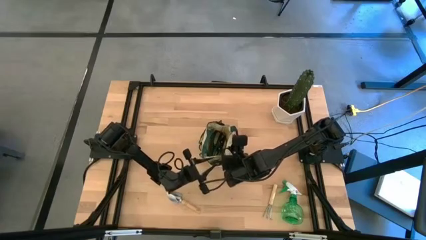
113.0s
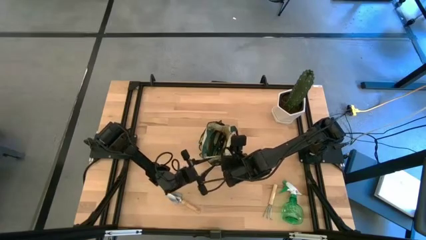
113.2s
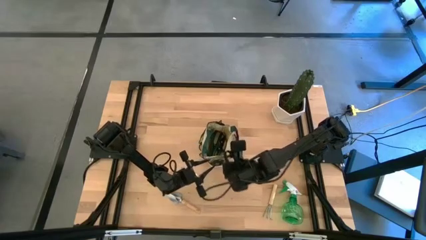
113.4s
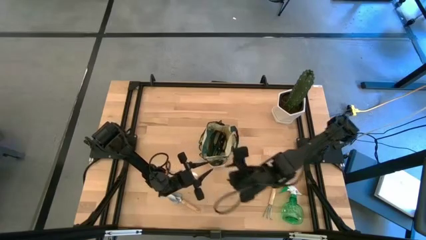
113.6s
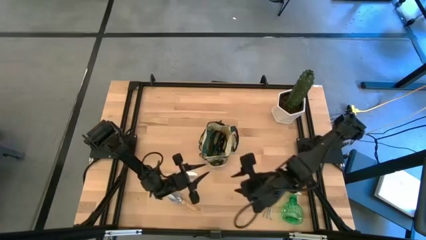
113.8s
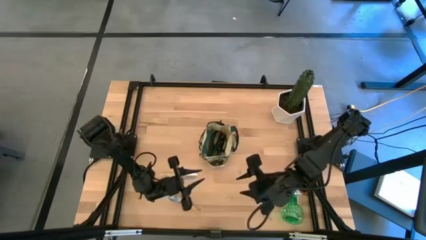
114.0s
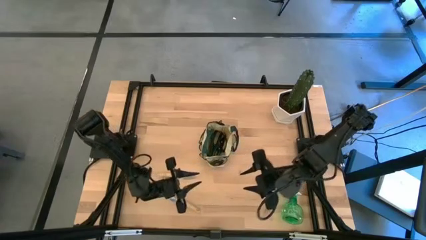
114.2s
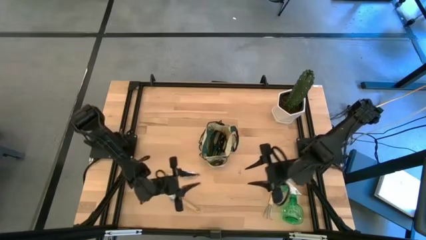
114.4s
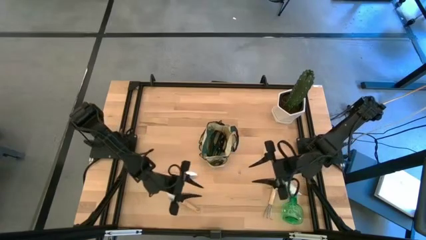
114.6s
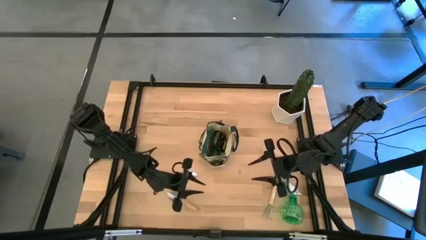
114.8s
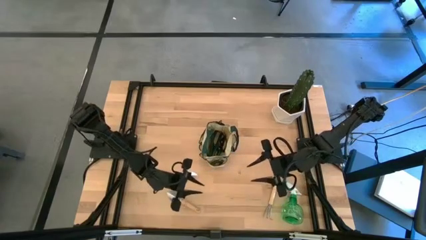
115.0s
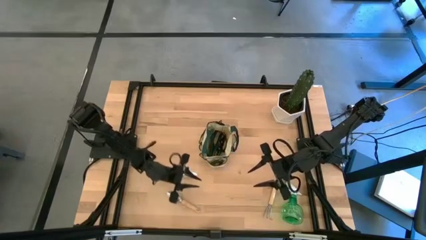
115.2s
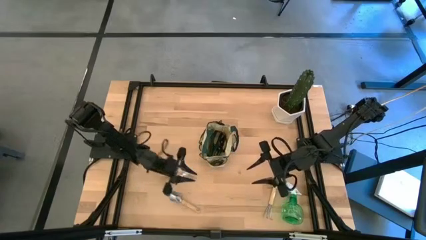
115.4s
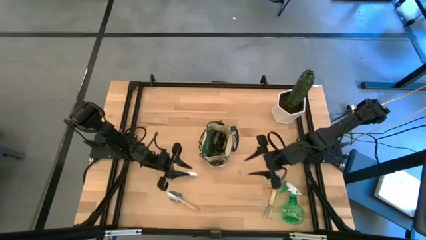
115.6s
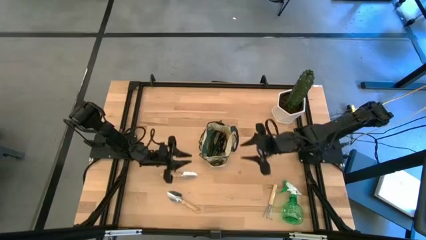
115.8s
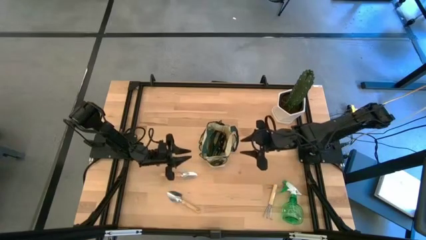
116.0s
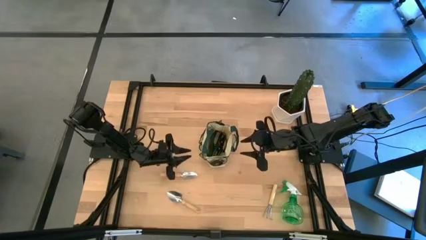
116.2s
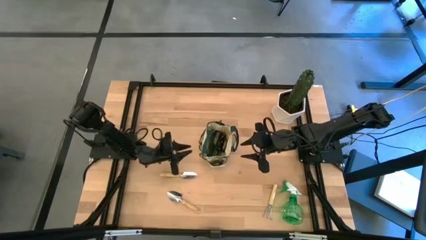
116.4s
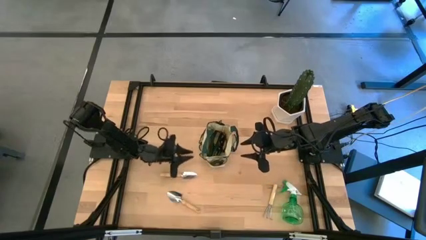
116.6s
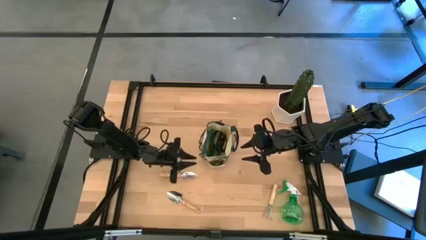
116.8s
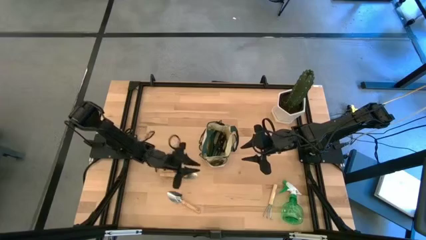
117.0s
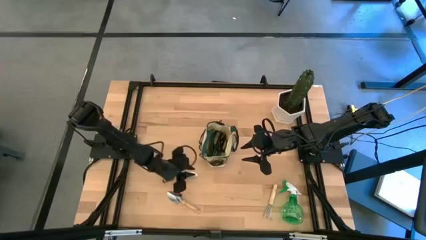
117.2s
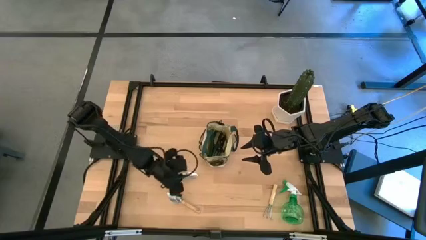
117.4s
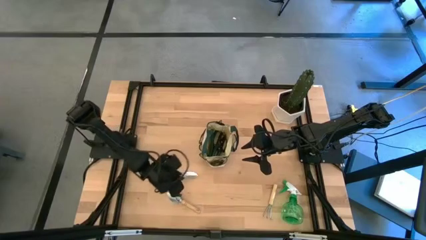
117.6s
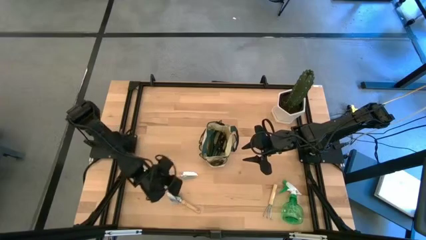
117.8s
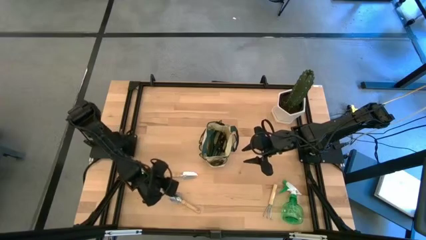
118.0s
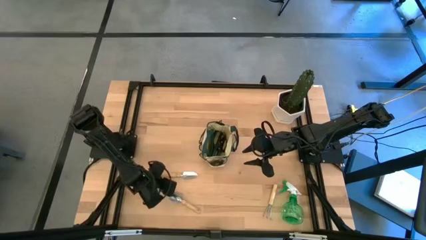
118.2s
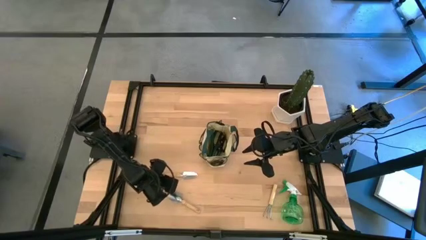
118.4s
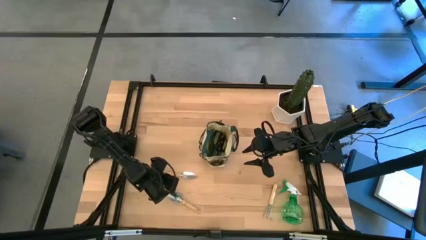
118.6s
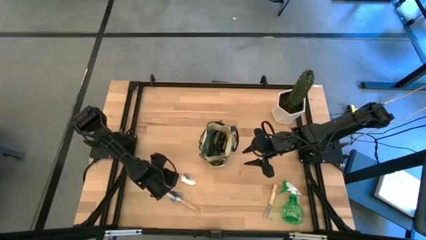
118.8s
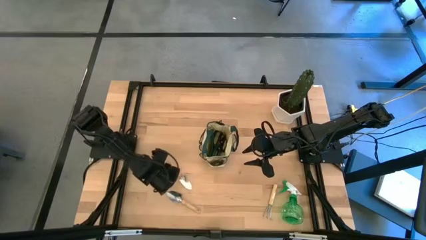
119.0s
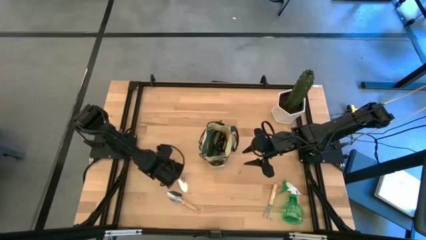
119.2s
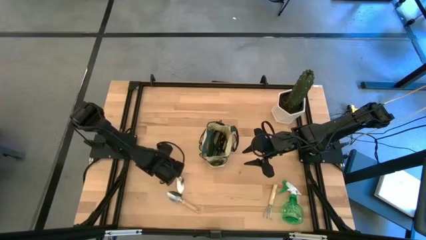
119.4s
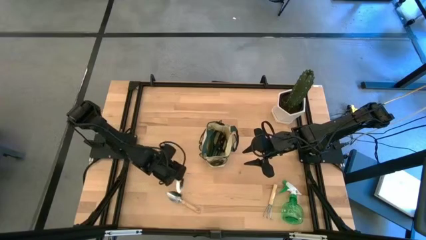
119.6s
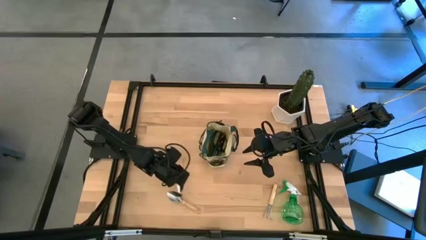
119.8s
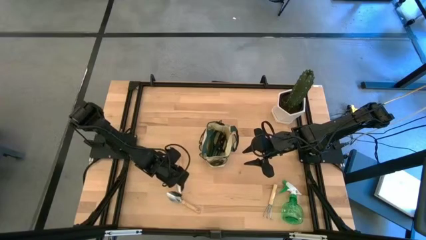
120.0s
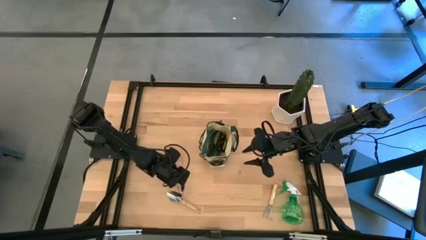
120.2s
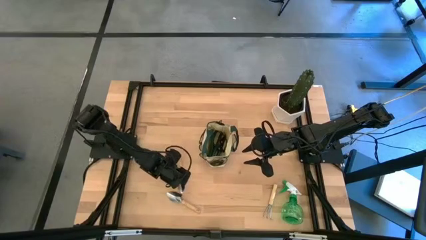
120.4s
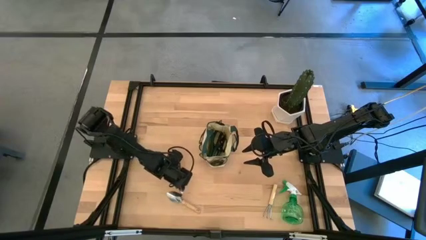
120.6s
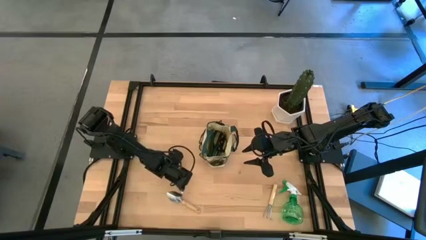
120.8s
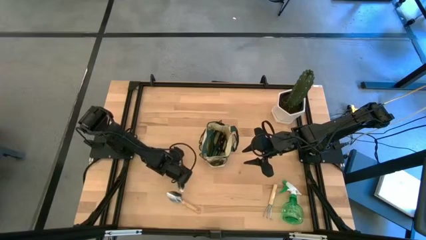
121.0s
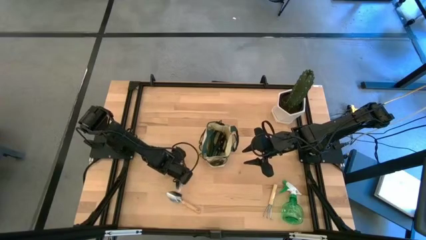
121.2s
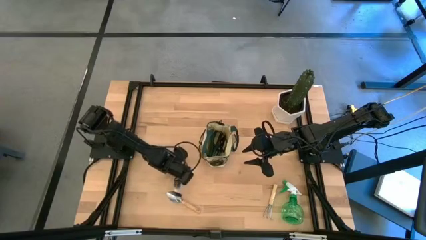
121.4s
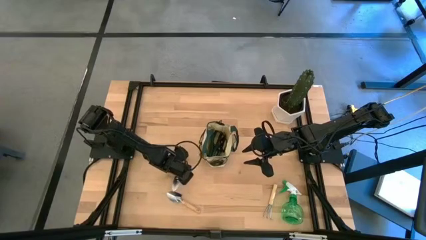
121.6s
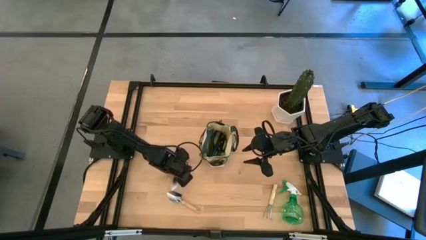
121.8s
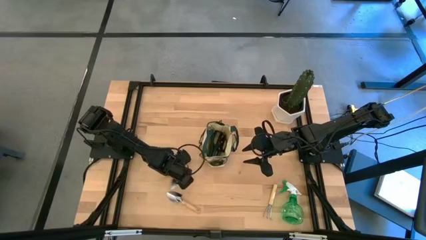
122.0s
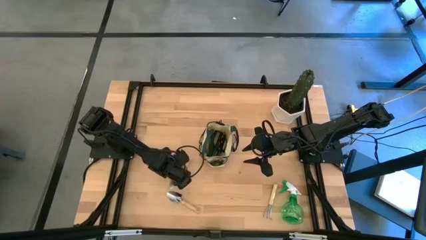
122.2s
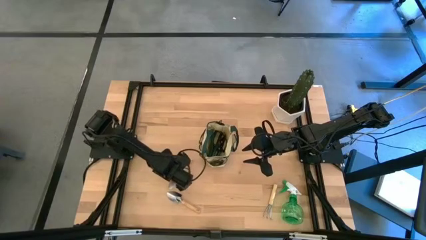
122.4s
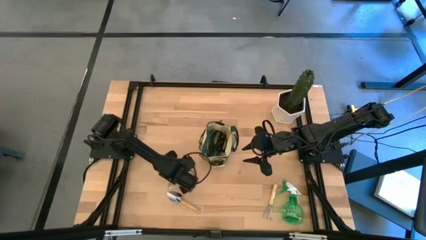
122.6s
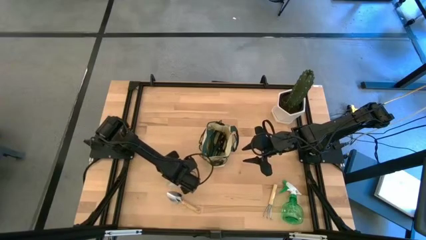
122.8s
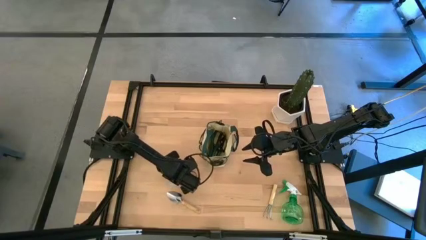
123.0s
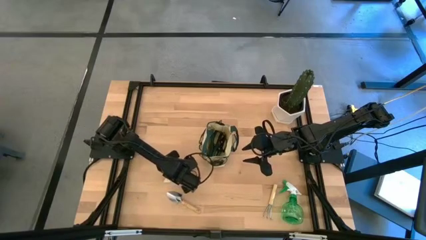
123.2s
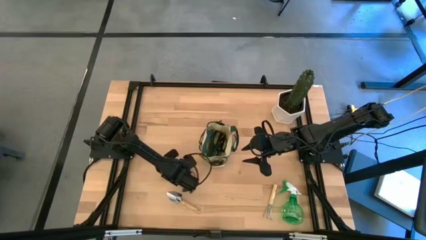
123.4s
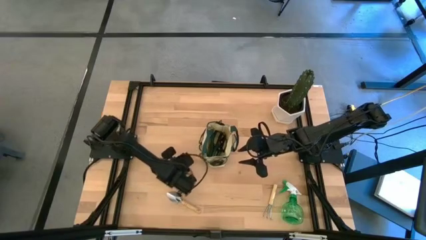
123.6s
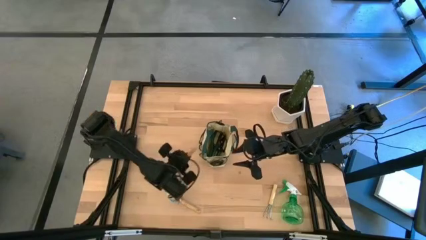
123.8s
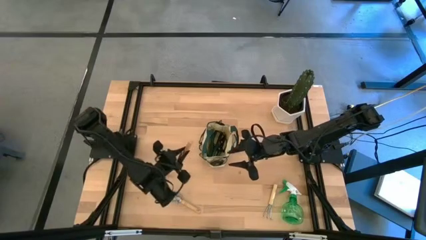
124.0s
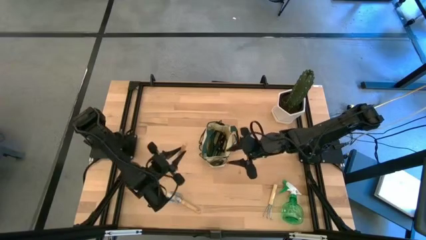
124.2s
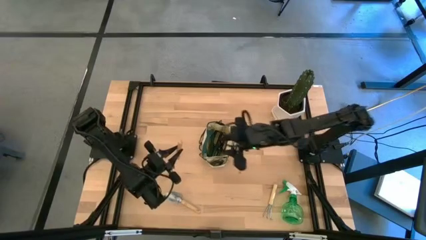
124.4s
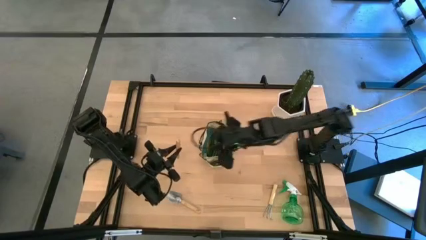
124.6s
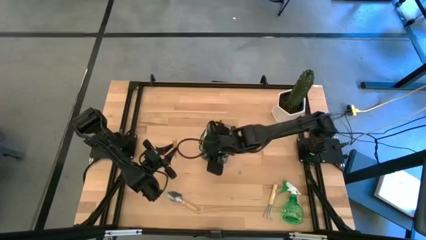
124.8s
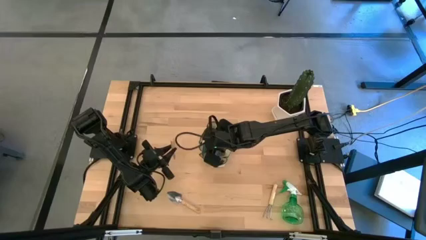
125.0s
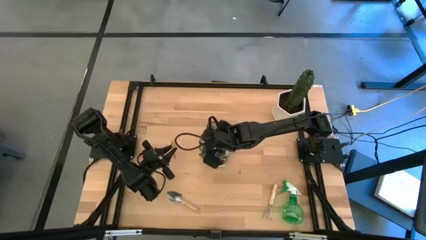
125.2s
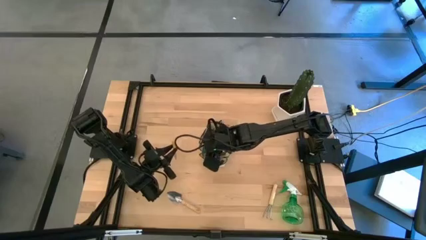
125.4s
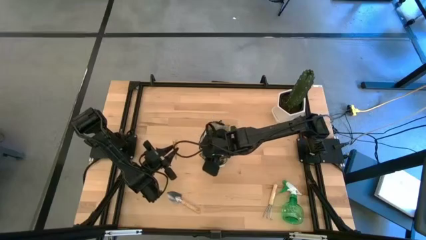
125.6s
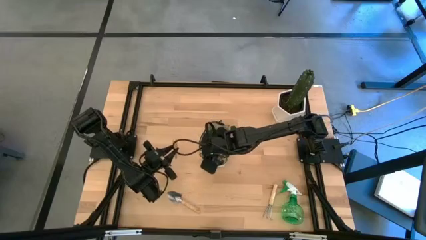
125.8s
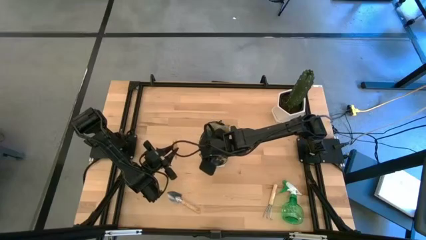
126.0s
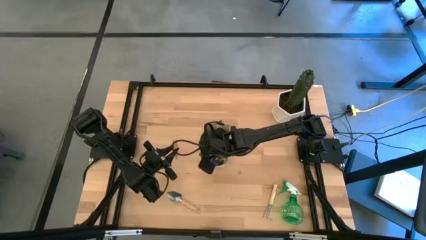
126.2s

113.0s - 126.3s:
Task: Pick & Place Garden tools in Gardening bag
Put the top brown trowel into the green gardening bag
